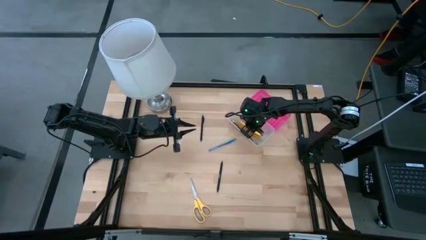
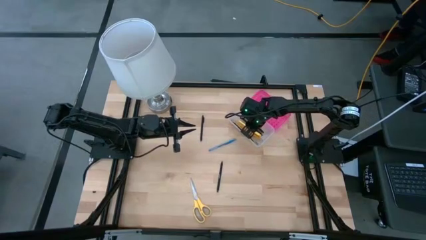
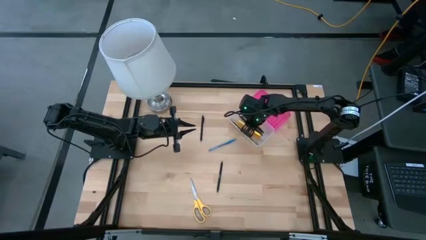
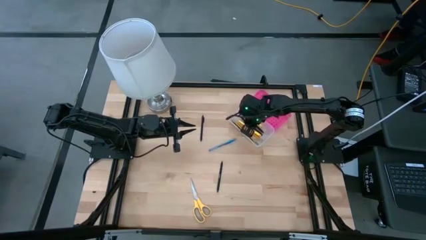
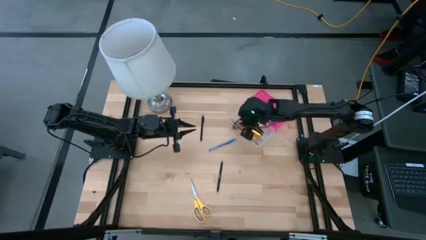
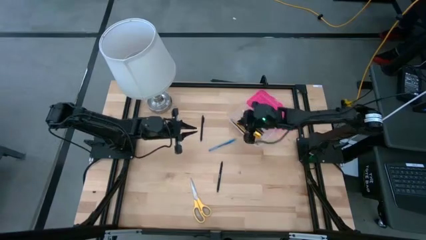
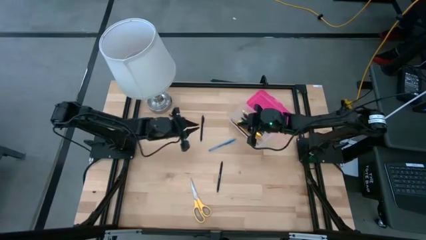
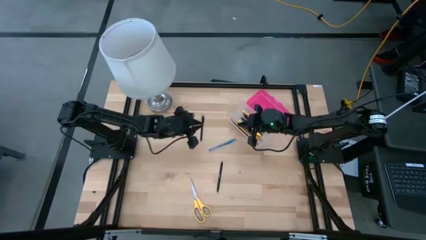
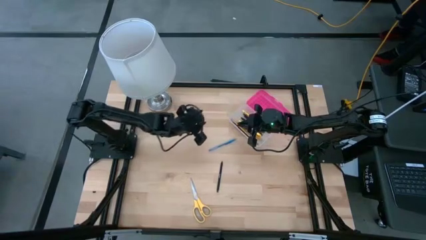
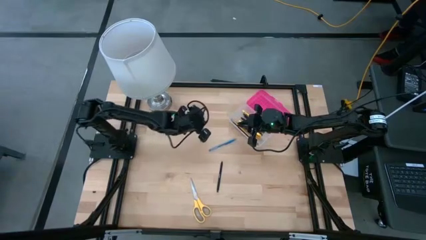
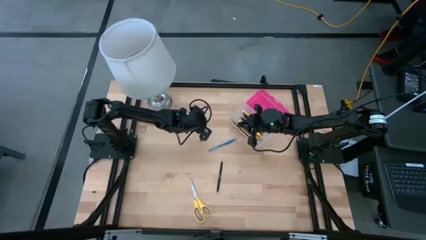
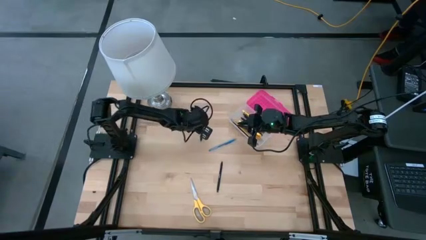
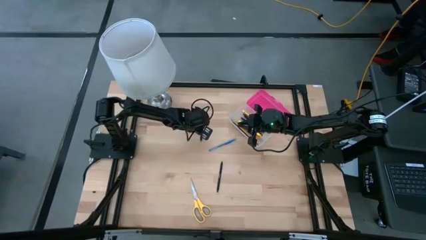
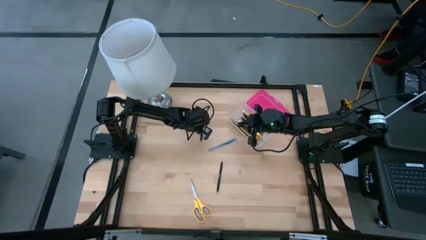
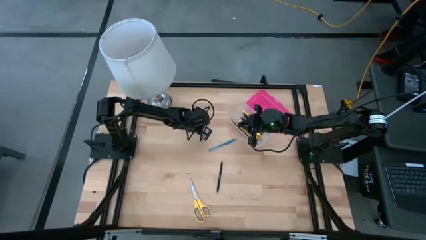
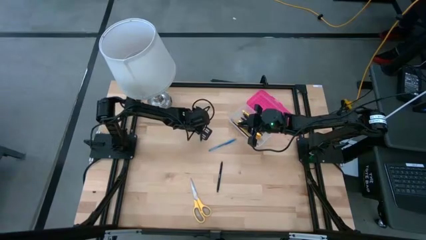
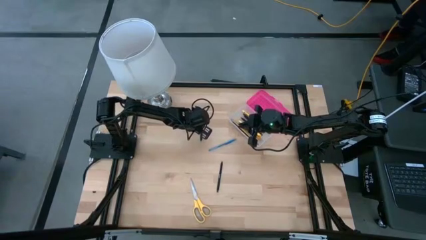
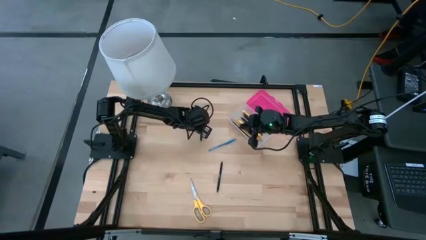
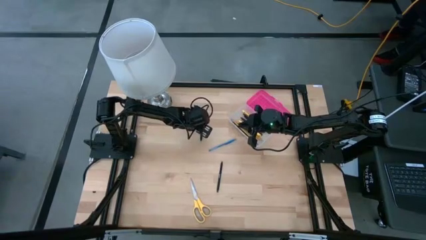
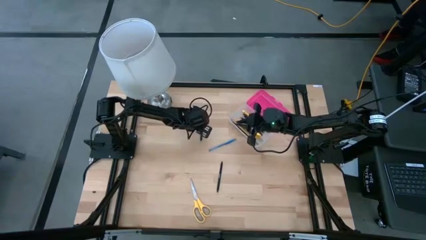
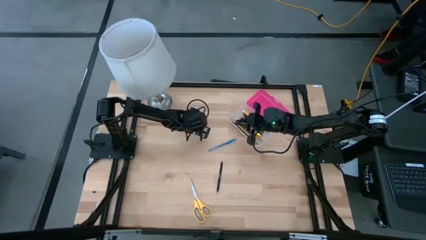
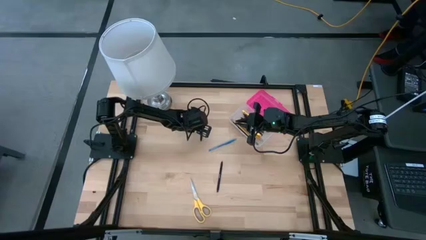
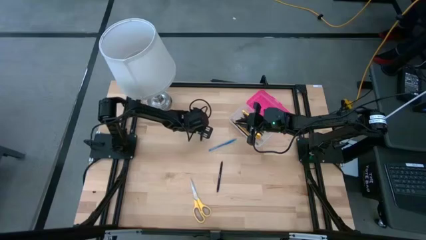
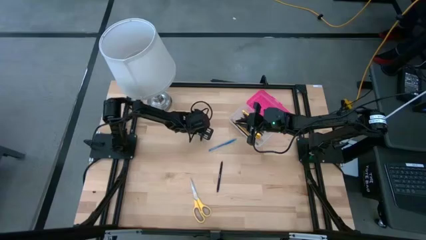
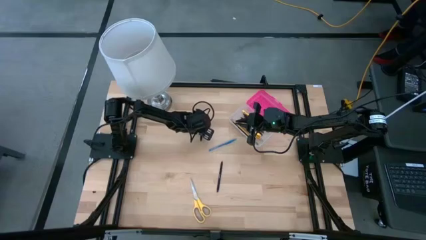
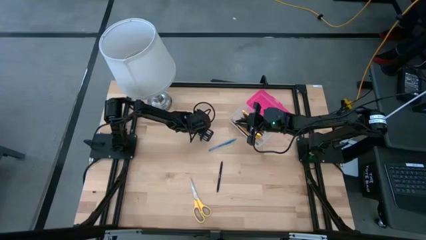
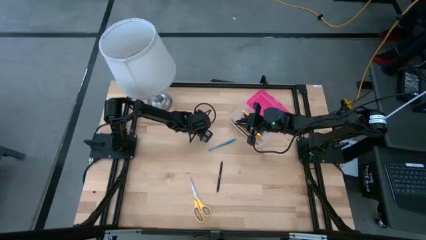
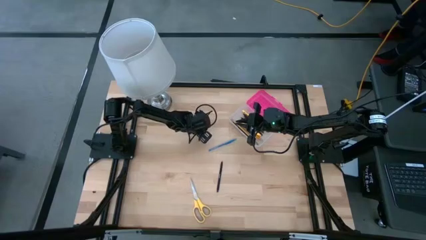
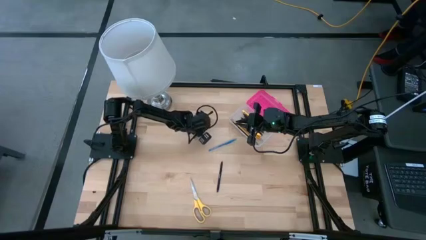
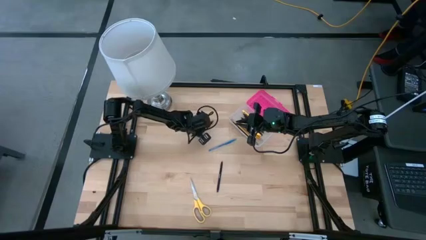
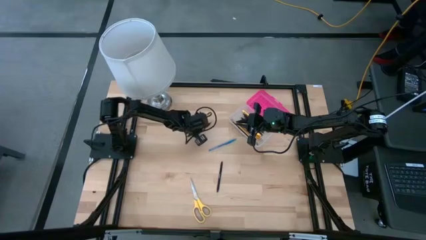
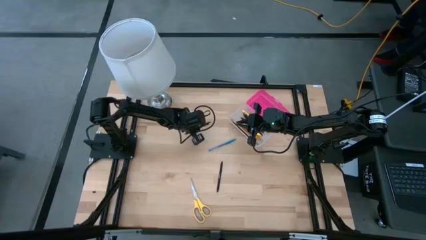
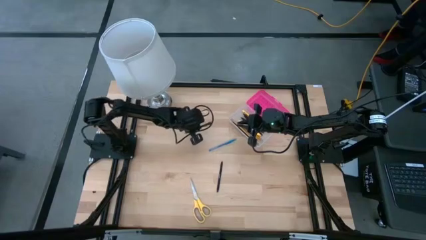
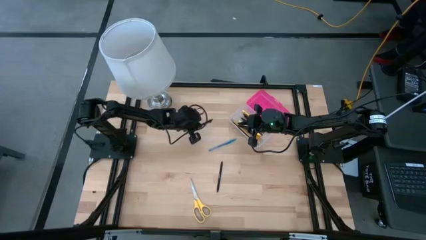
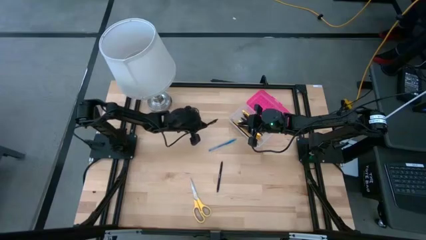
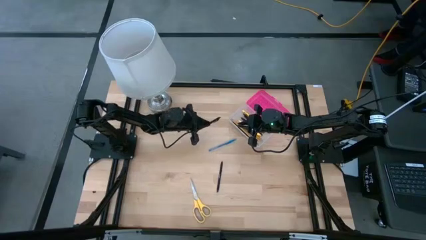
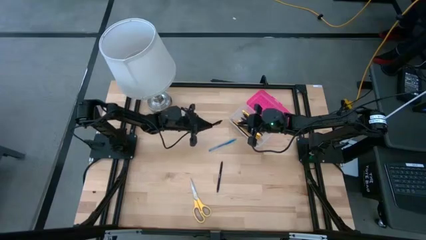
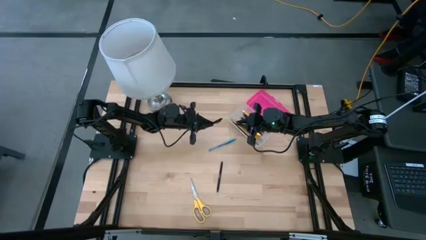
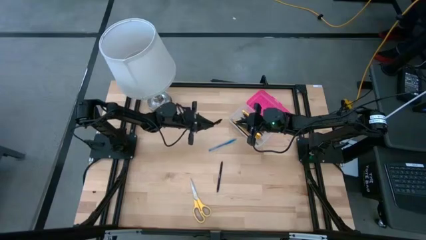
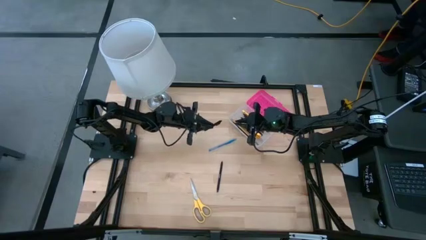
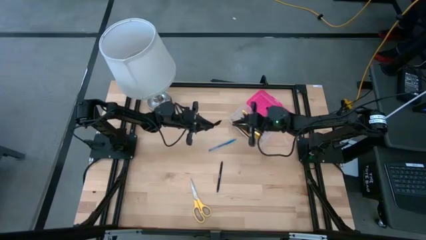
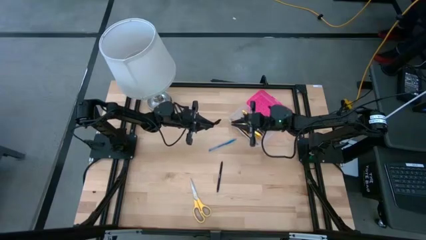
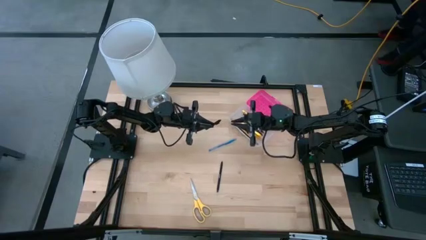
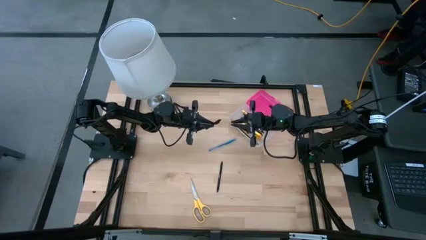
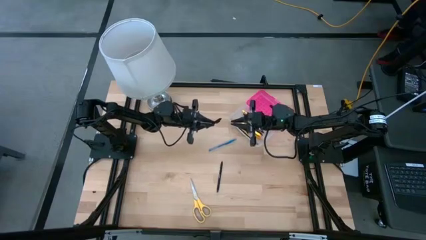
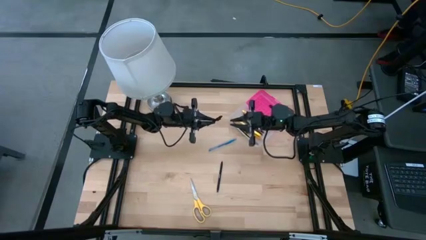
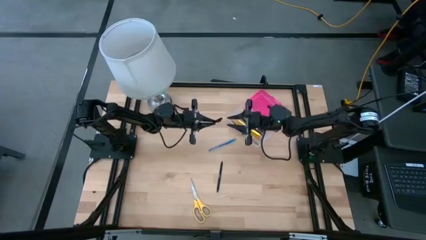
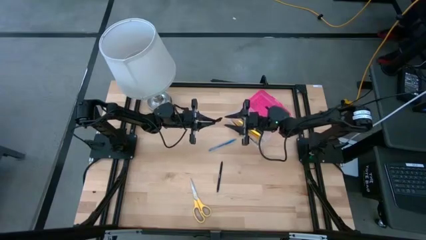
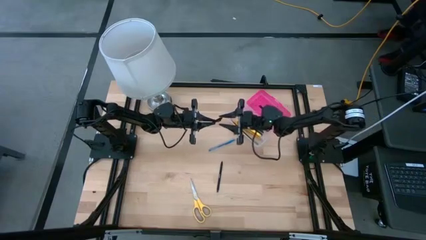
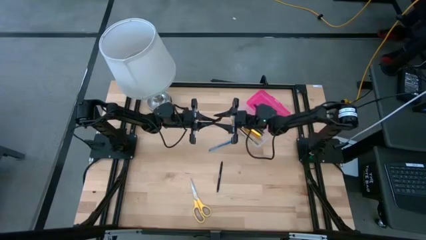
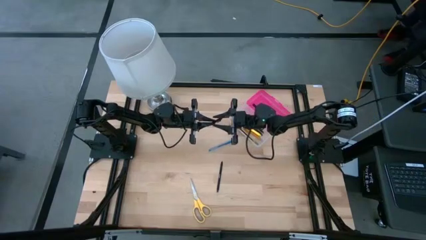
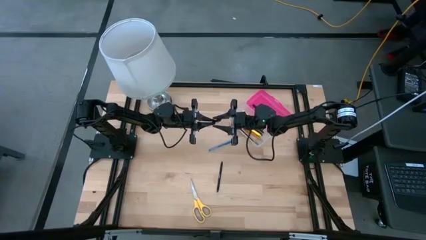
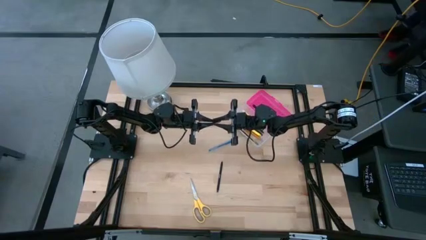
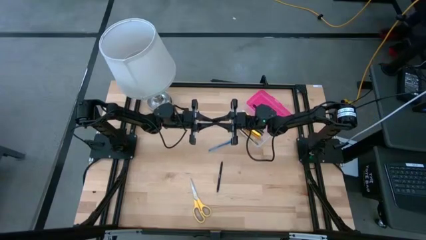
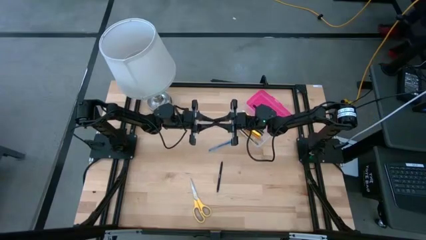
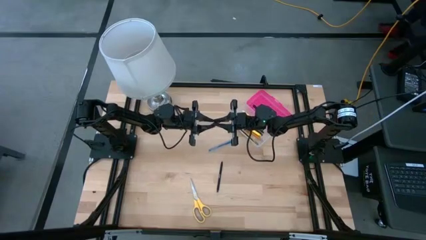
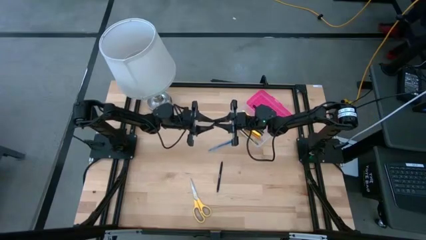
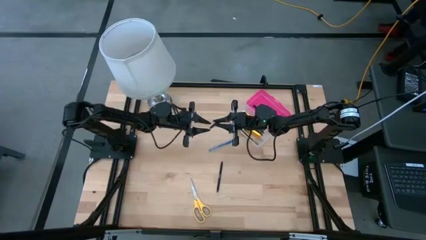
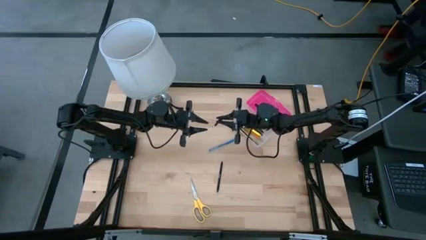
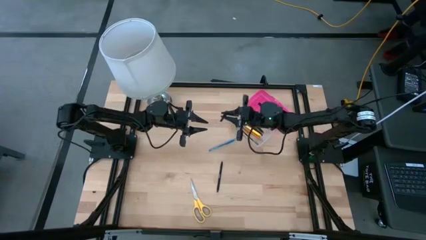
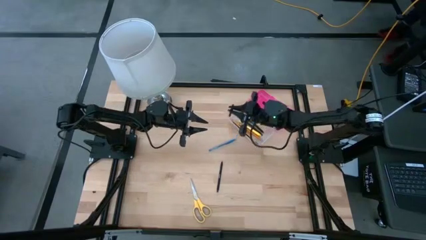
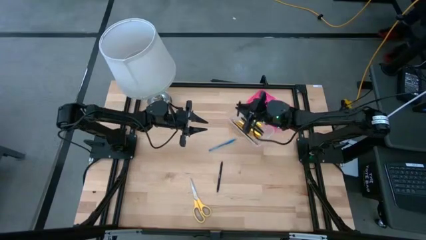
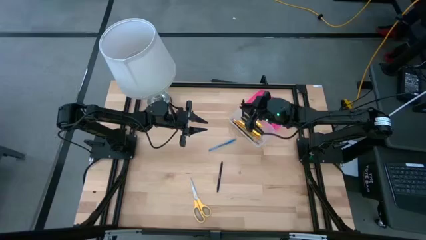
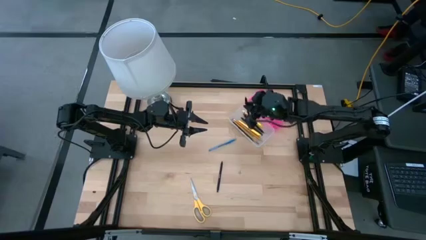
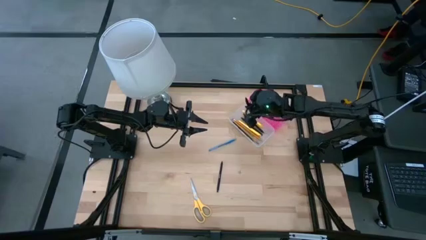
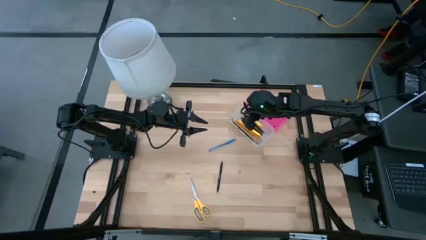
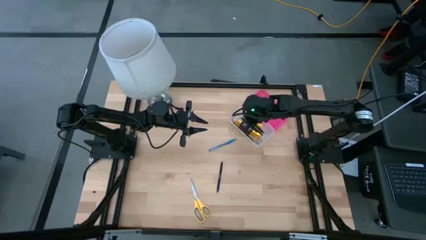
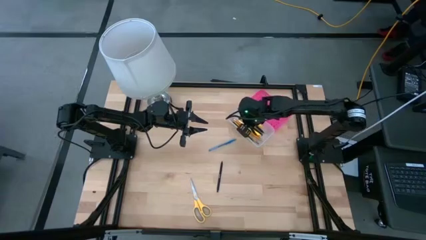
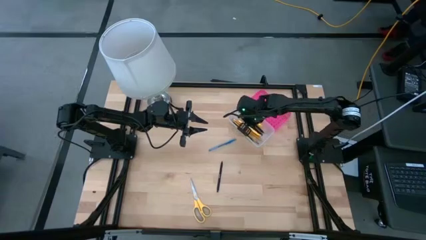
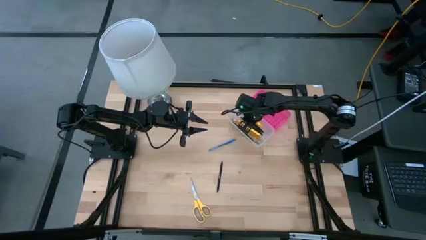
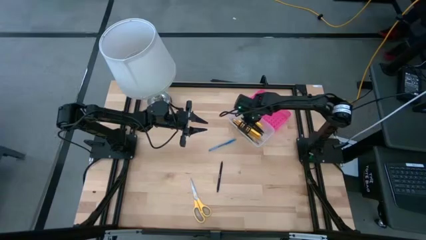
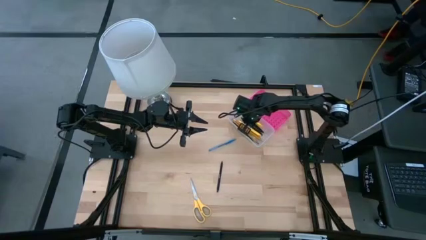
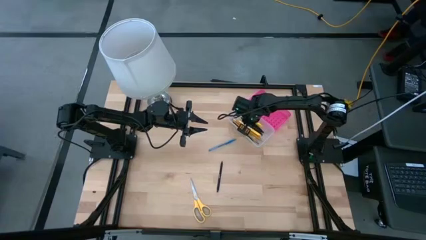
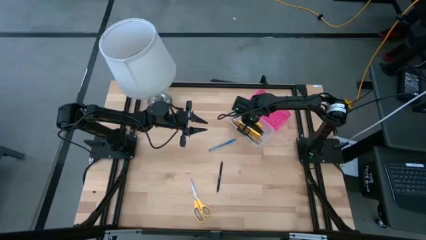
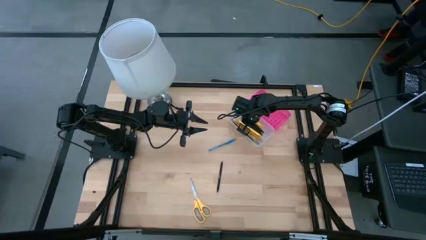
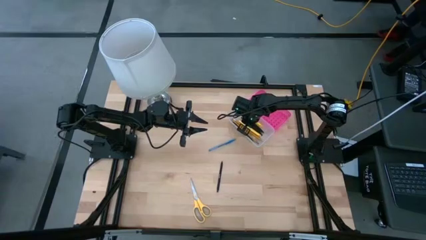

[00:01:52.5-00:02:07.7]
Task: Pick & place school supplies into a supply box
Put the black pen into the pink supply box
